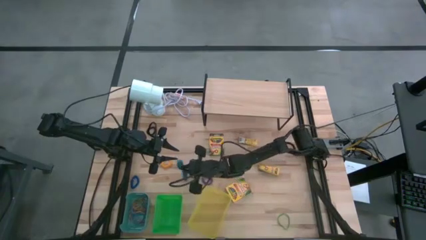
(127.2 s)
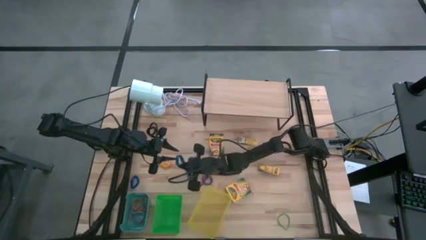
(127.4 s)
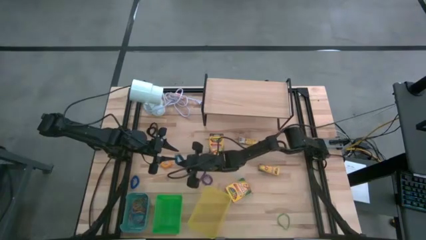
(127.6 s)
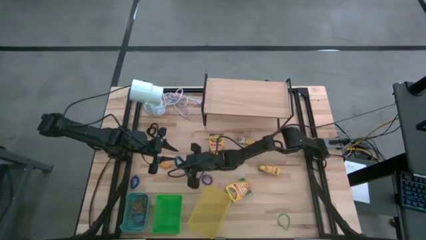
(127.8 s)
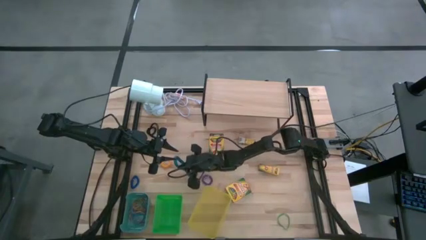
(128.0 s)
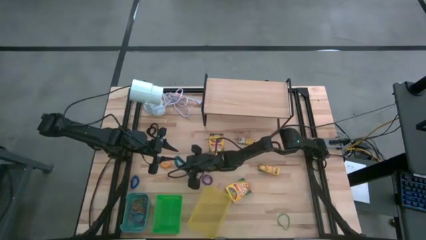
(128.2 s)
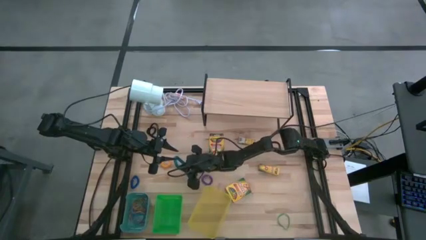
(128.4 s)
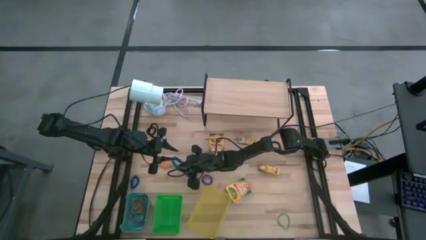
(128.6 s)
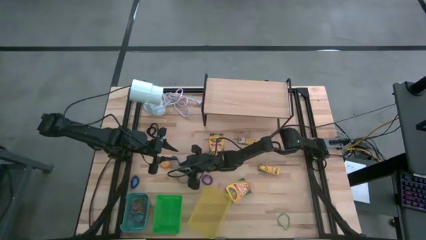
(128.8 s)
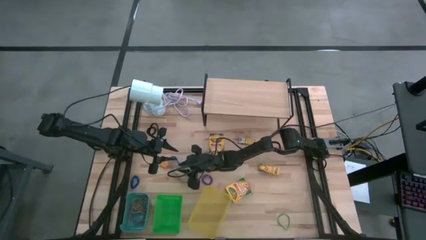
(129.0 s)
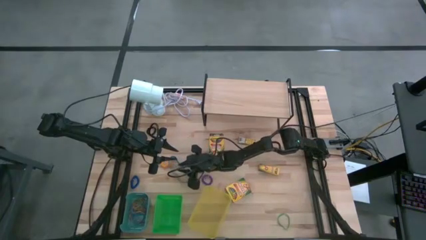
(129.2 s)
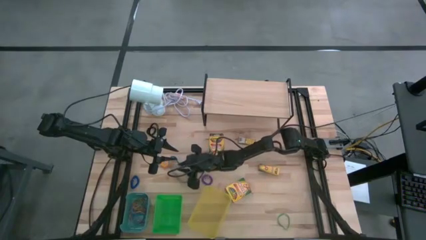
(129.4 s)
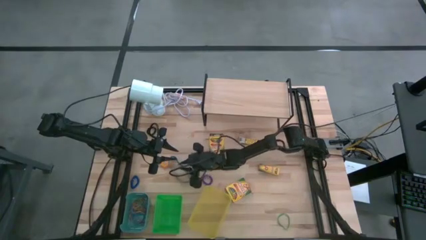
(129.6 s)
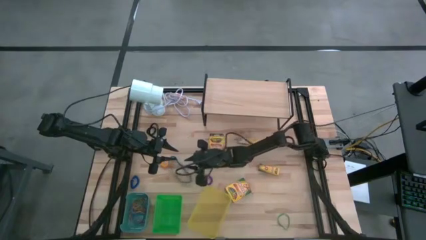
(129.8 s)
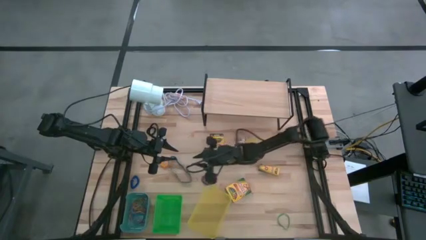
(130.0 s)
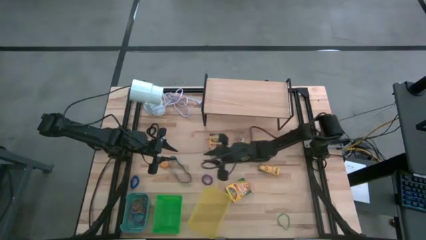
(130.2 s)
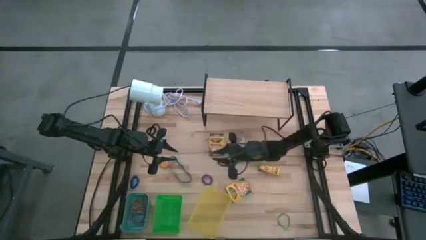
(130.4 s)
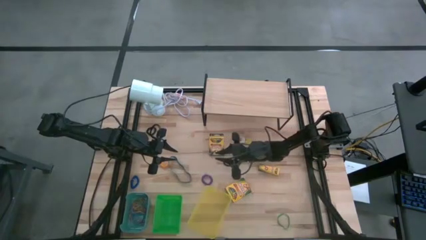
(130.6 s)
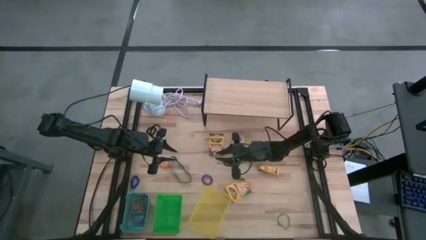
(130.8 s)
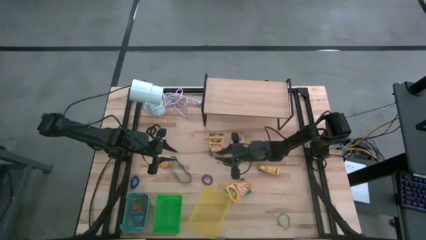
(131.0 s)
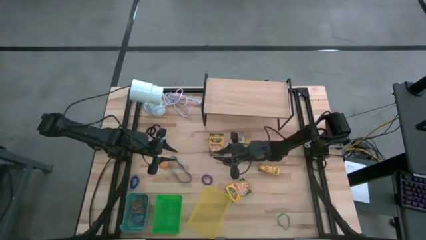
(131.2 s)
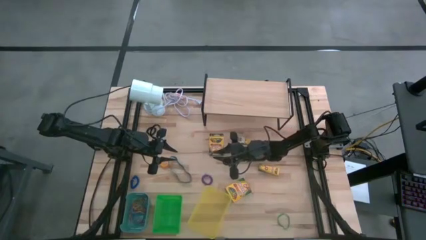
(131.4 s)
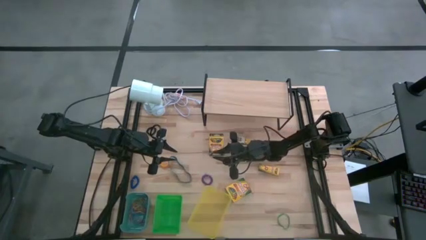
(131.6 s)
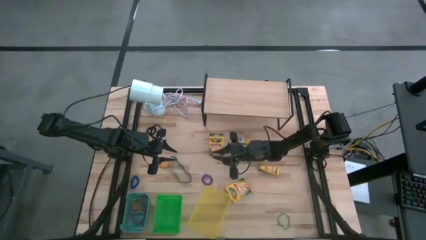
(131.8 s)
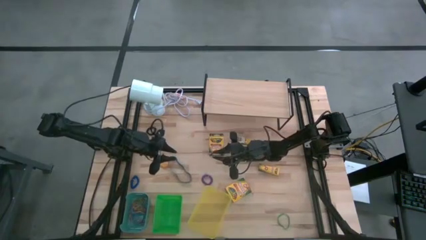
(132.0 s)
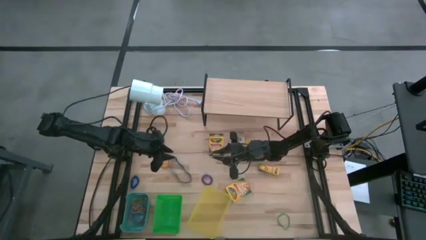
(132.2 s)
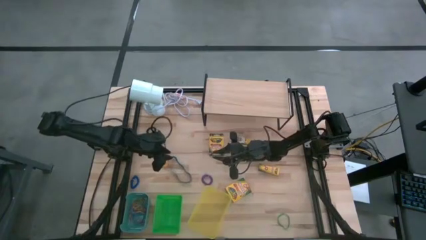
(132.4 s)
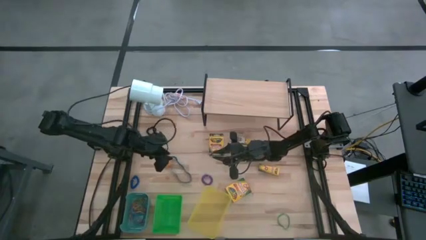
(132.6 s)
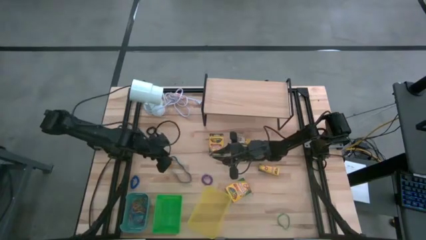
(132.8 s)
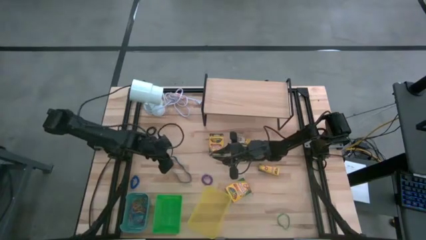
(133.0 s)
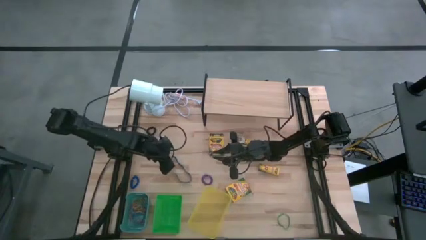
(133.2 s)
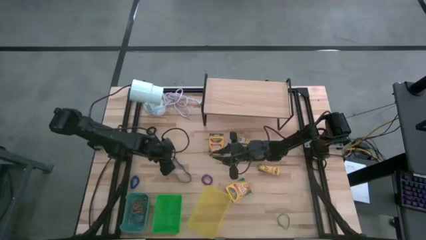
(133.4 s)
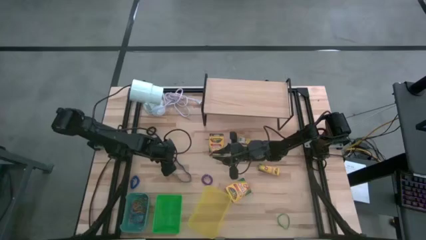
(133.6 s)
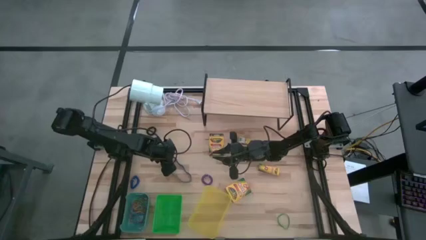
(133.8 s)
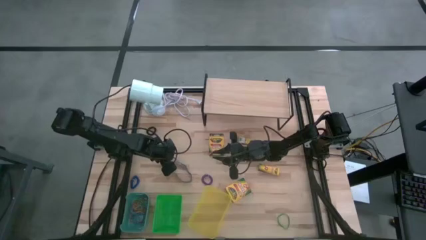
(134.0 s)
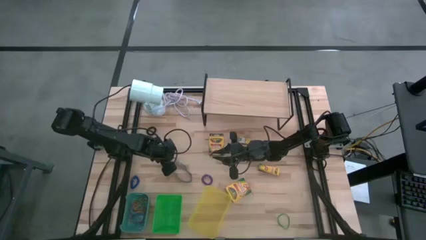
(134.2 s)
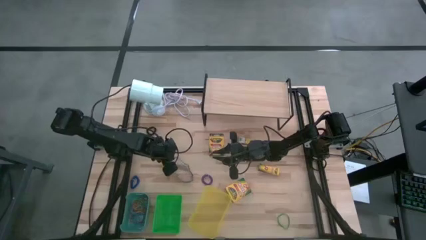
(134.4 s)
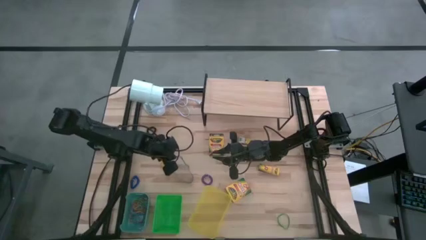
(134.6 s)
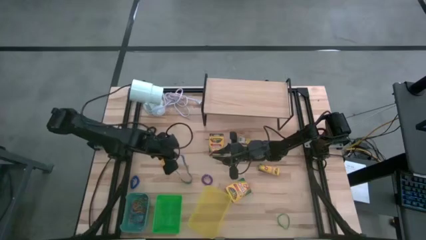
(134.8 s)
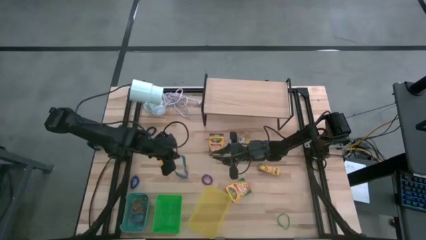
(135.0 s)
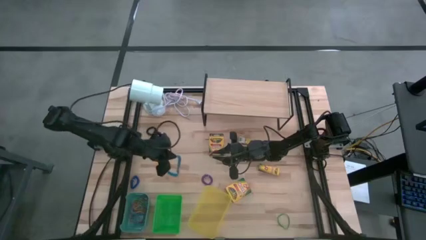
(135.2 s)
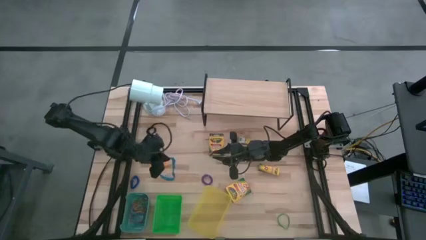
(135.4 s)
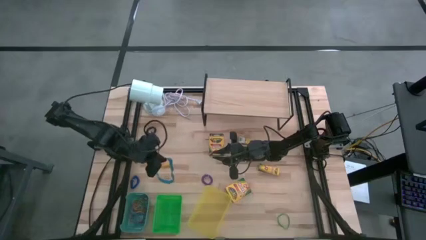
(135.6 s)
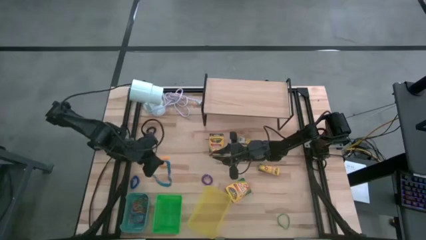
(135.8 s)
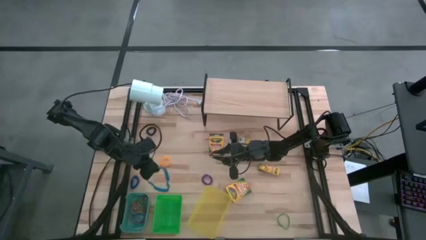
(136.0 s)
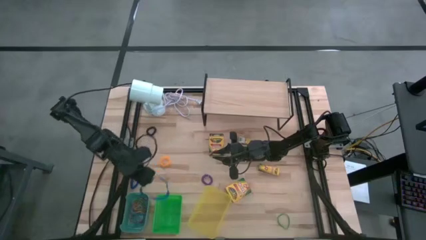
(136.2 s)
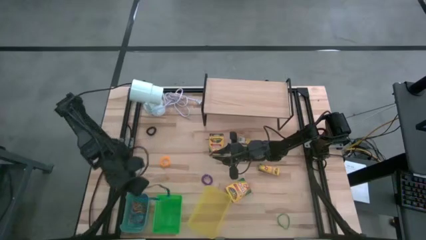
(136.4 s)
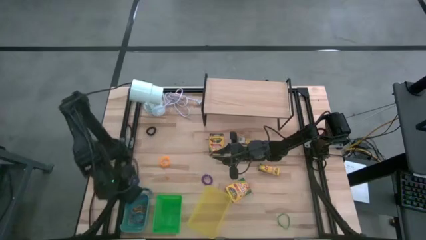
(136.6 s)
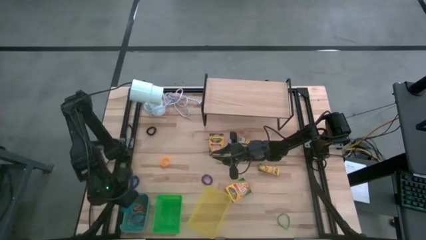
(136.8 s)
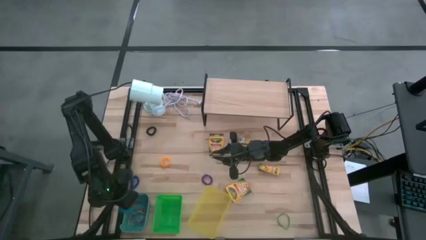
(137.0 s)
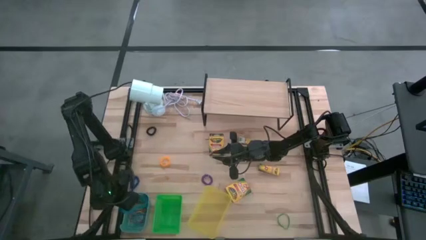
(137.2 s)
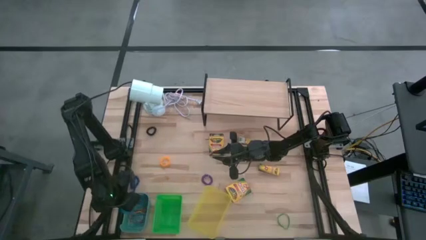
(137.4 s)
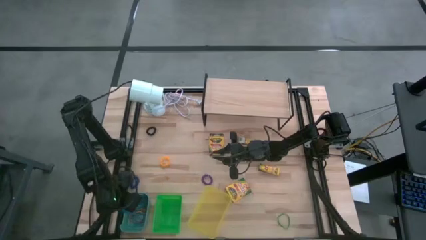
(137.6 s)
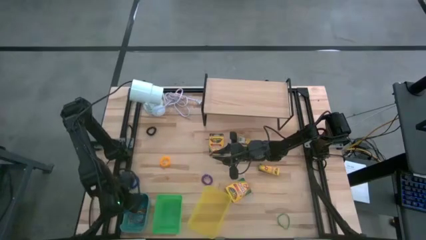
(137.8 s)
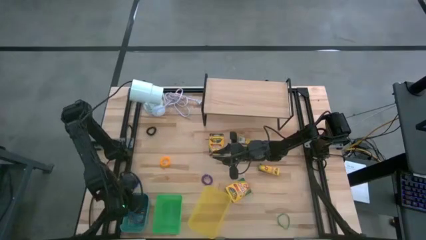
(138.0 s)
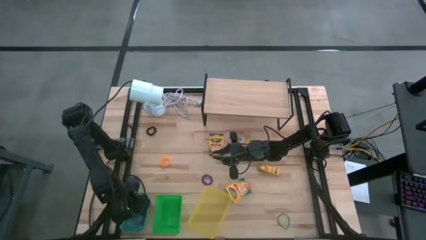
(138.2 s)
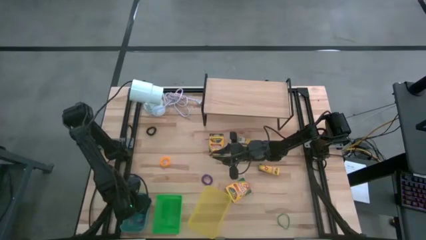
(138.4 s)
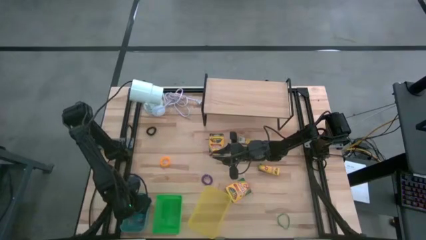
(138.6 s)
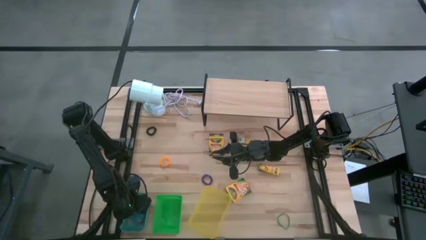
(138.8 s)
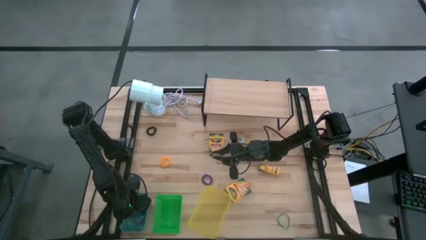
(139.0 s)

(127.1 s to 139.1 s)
Task: Pick & Place Office Desk Supplies
Put the blue rubberband into the blue bin
